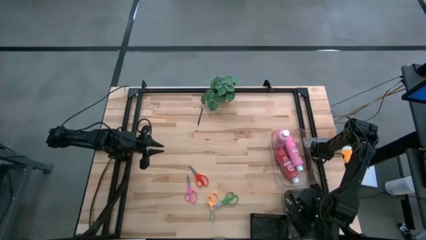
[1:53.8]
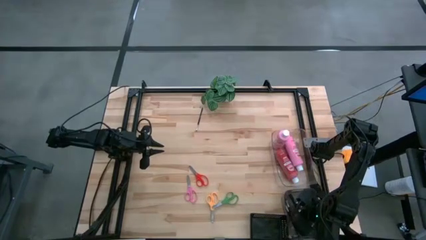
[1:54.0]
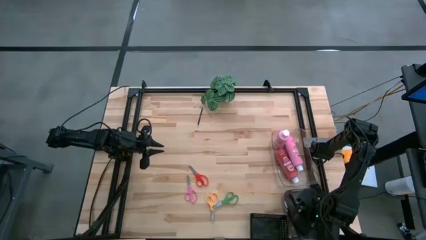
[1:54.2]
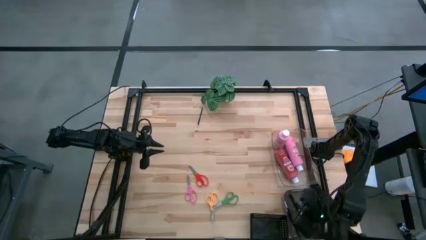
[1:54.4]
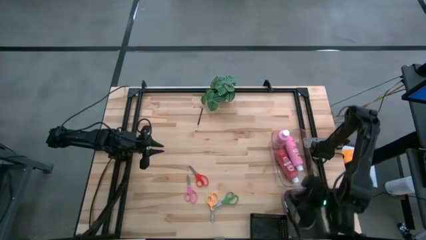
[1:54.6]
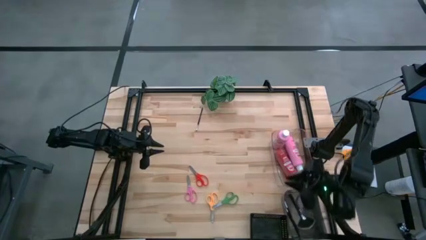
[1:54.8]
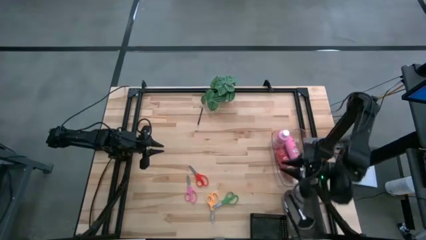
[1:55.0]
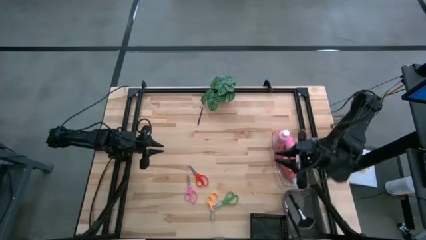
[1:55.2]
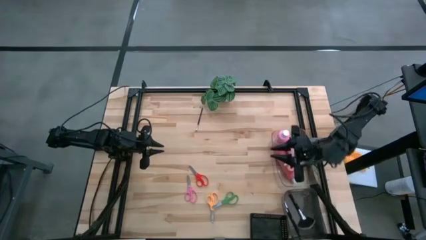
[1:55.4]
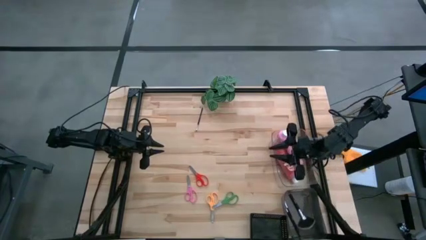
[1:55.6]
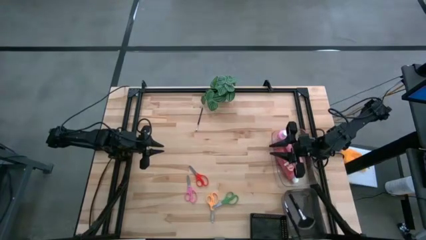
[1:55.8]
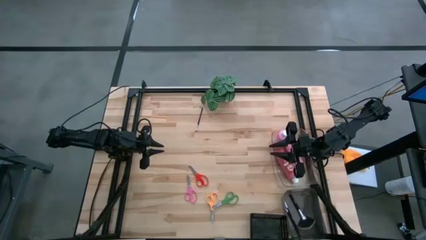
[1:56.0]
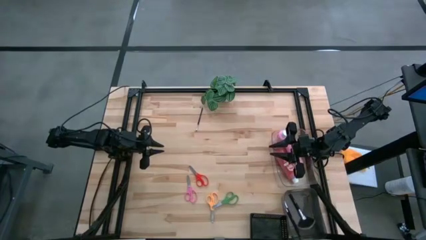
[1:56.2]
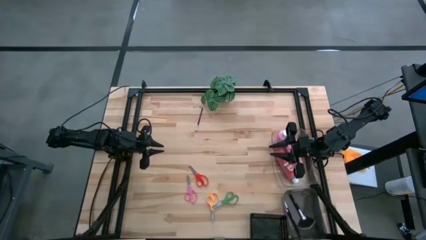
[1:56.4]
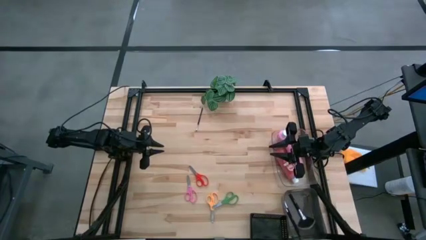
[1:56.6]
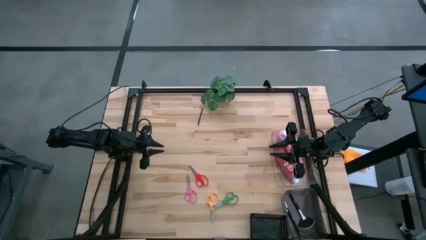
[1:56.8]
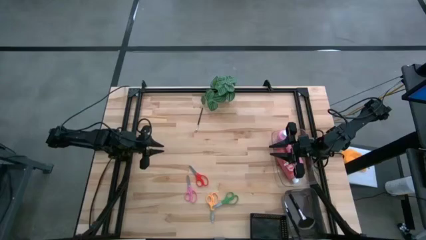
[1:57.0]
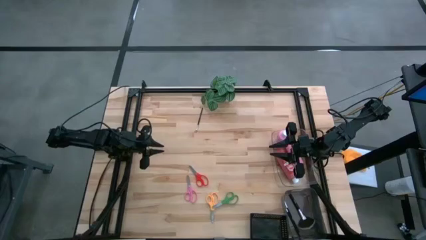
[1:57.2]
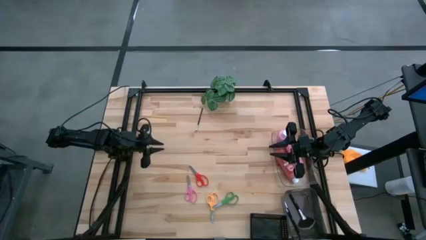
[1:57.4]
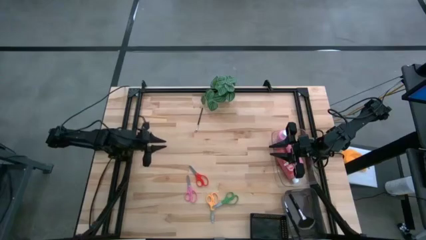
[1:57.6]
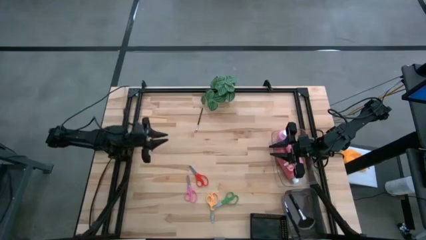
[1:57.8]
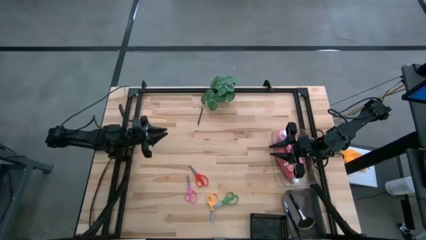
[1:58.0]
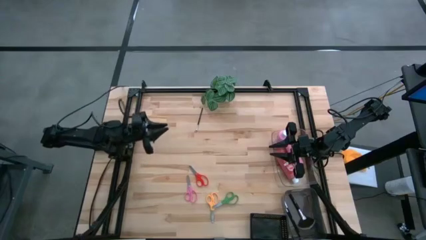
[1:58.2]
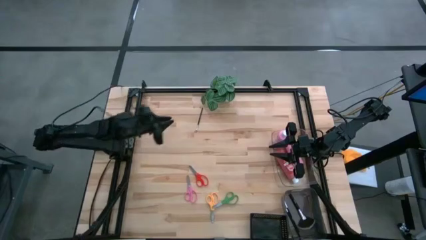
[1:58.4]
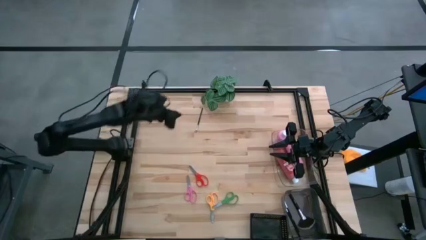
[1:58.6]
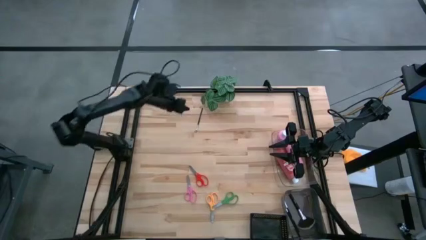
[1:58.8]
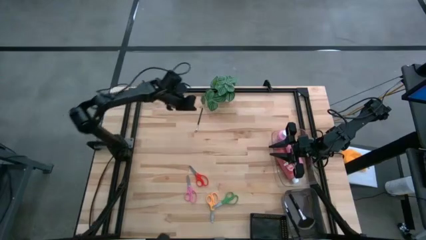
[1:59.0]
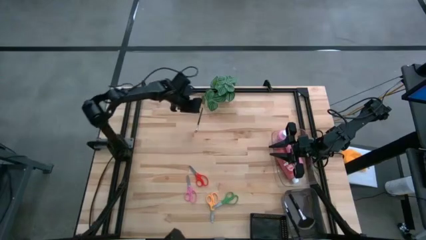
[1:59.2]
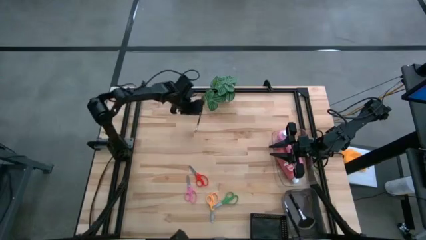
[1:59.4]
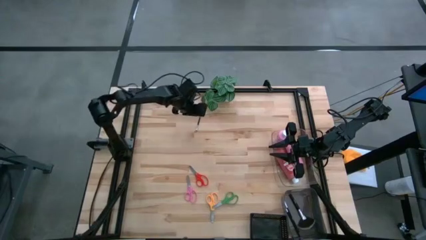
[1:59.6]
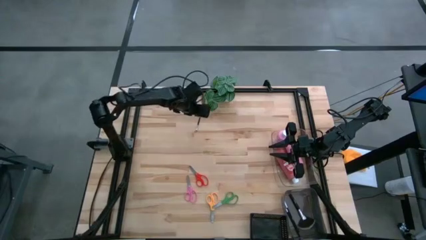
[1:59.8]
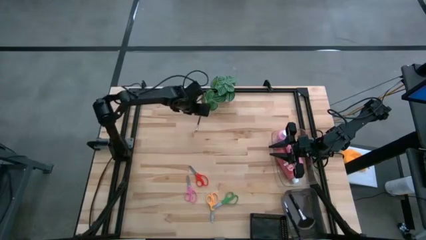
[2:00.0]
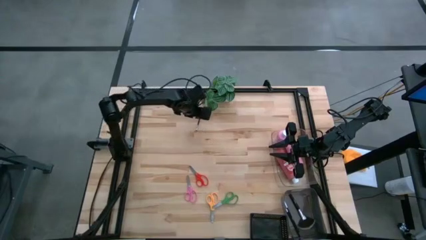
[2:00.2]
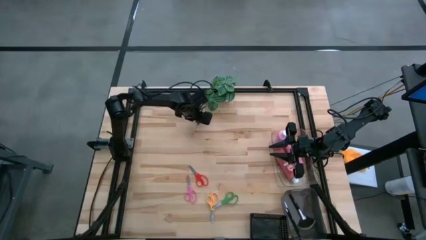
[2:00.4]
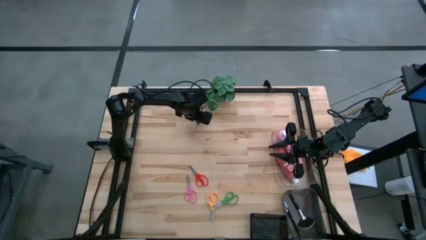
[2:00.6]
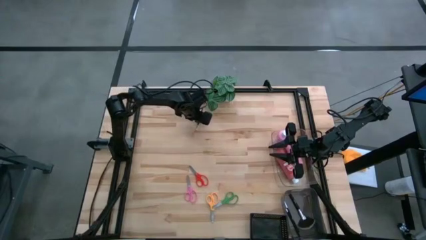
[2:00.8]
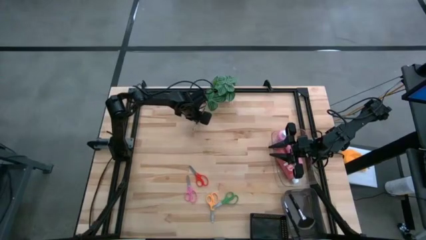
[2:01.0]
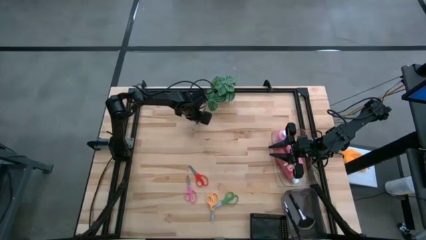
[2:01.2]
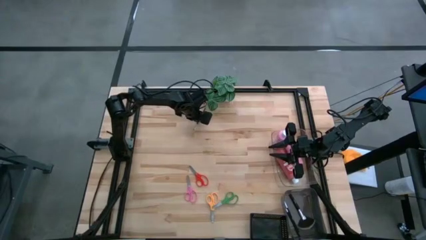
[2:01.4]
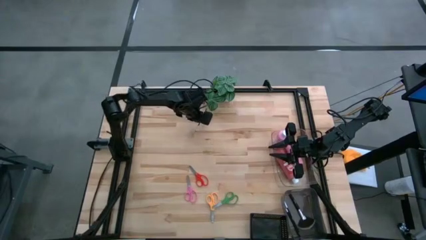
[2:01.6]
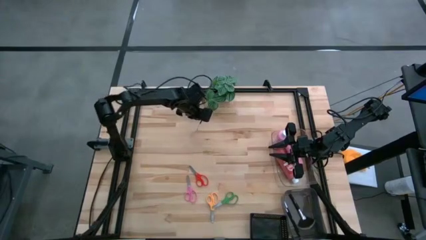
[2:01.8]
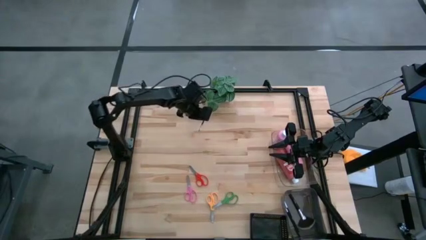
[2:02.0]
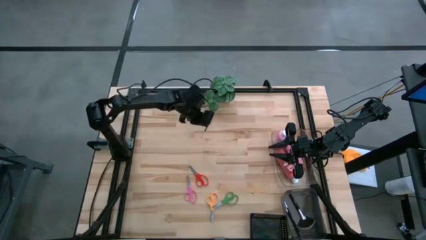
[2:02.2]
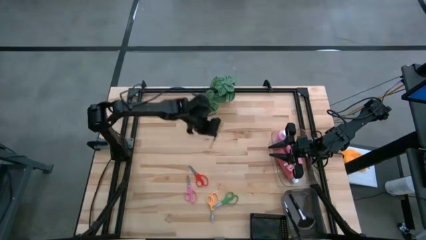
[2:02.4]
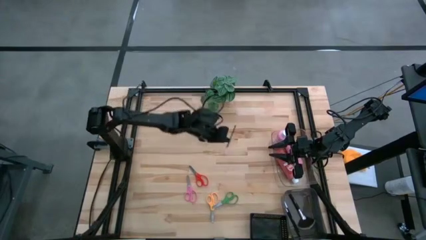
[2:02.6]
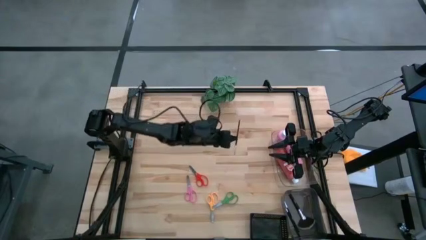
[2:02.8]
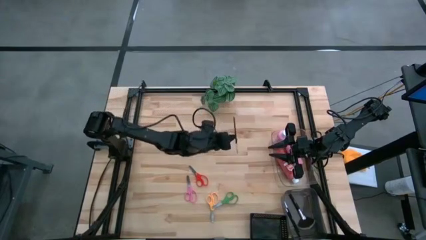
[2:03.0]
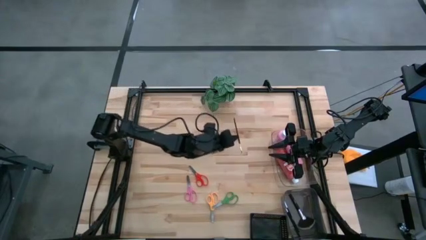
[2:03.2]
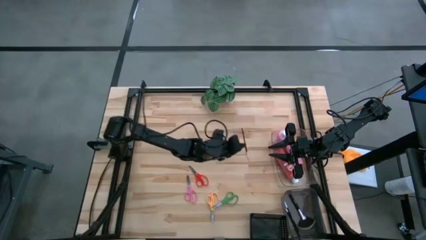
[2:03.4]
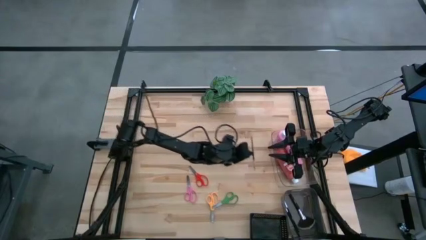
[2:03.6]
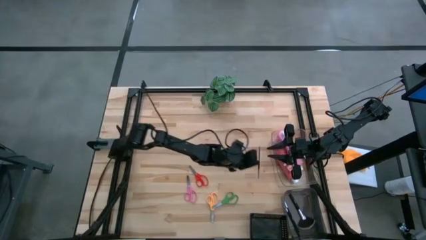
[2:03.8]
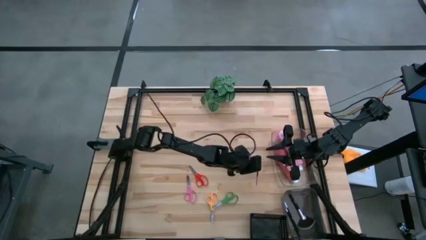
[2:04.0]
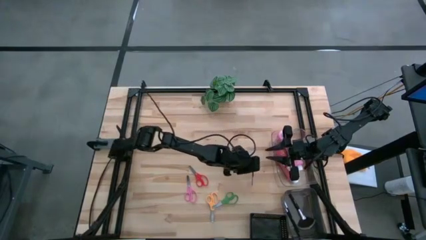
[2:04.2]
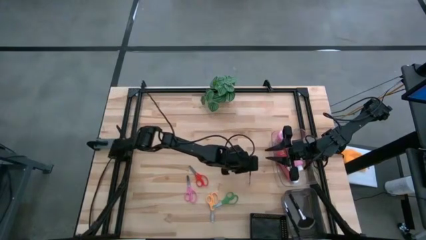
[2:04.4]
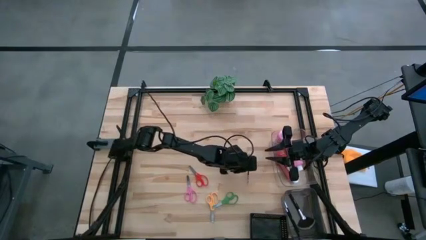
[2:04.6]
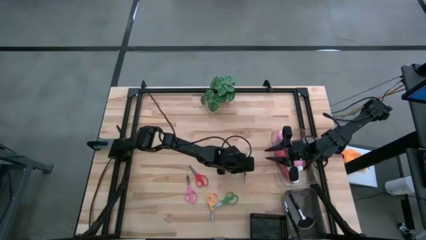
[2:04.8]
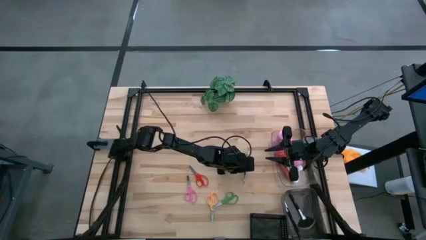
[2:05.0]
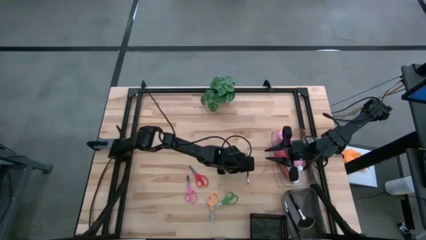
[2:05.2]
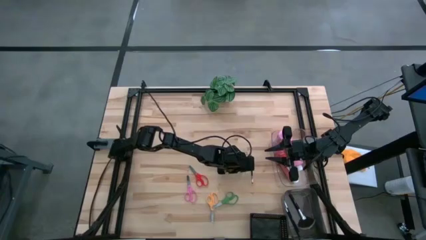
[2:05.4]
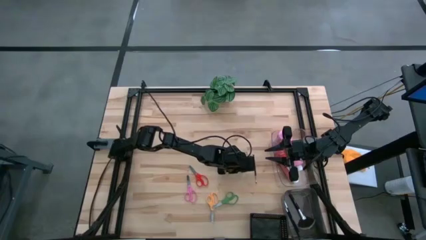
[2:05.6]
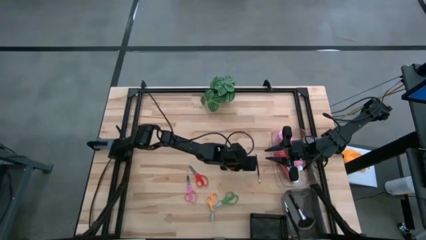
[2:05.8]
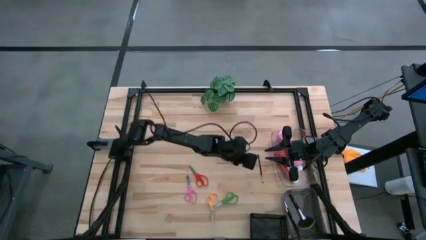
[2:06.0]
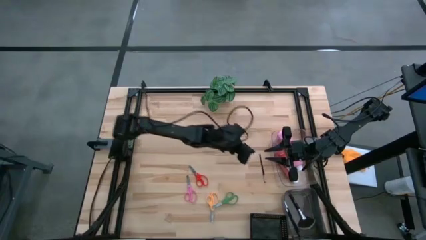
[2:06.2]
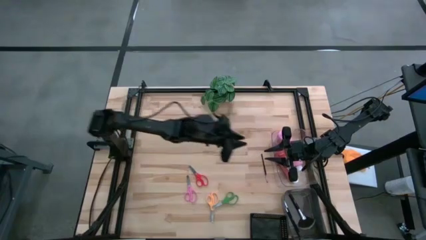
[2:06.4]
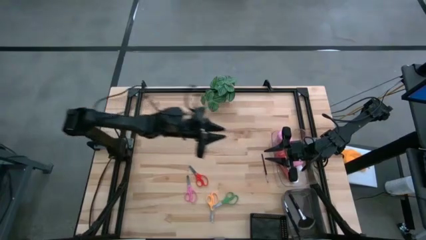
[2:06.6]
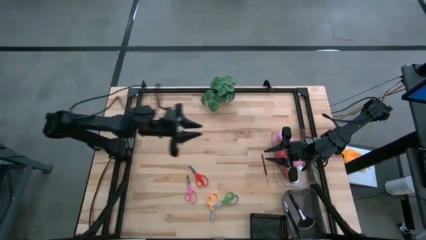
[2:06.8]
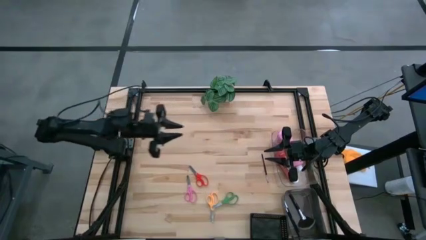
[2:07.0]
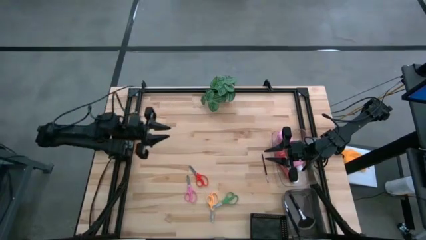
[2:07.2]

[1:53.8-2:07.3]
Task: Pick & Place Paint Supplies
Put the black paint brush into the gray bin
